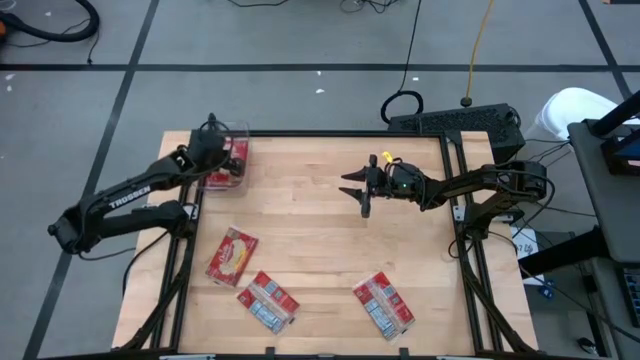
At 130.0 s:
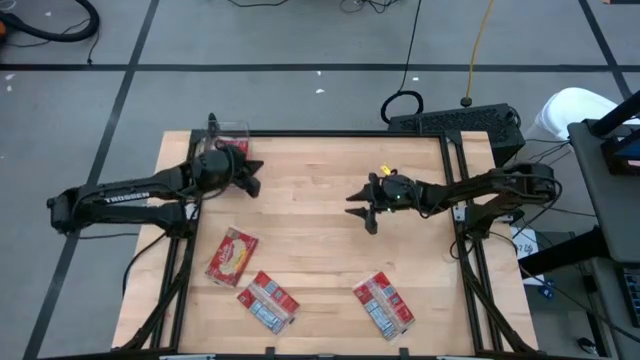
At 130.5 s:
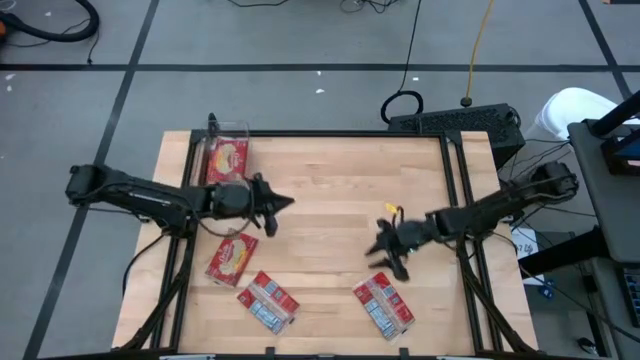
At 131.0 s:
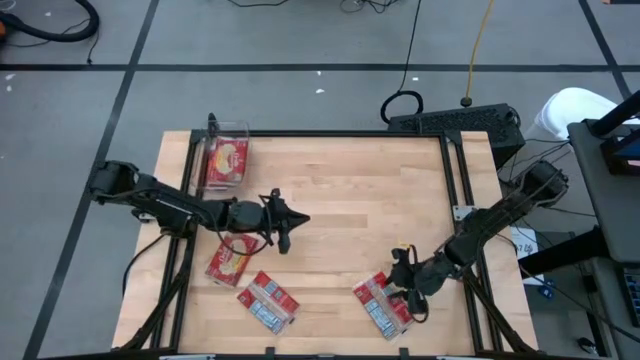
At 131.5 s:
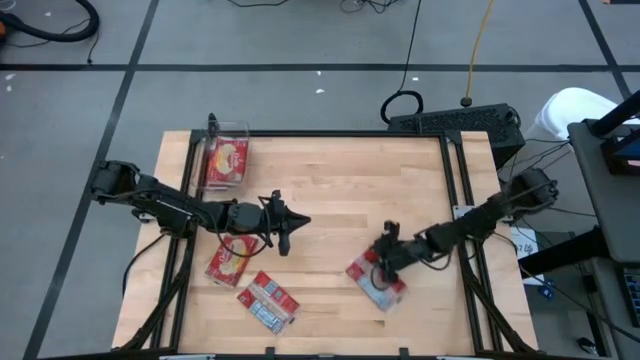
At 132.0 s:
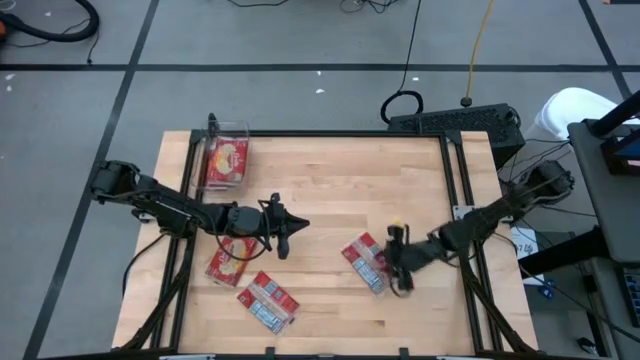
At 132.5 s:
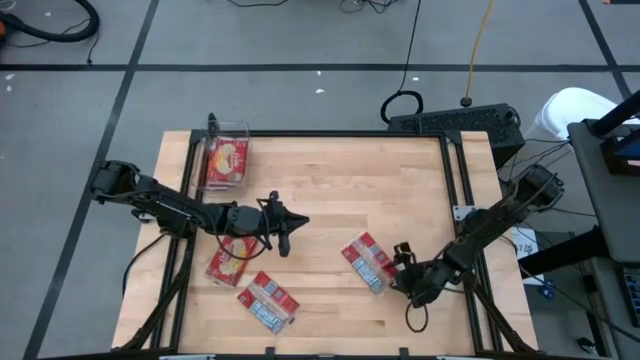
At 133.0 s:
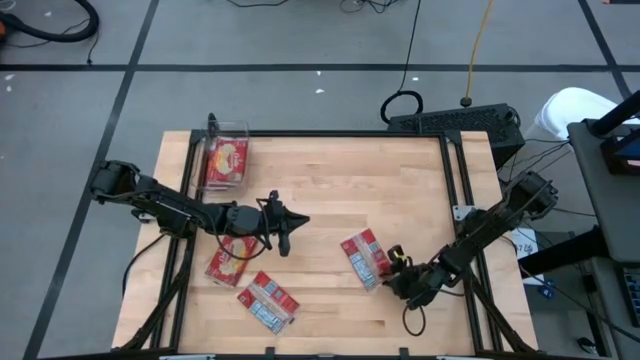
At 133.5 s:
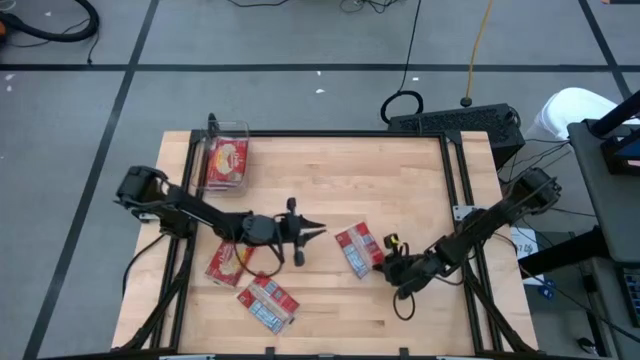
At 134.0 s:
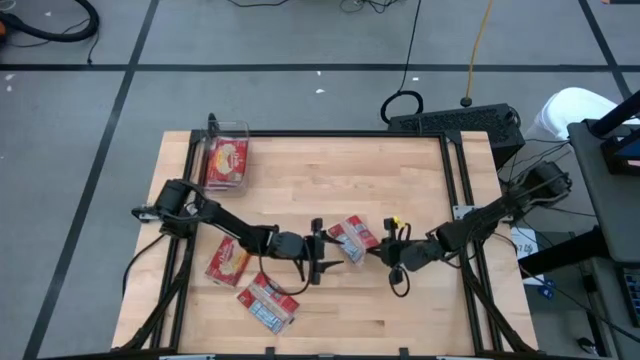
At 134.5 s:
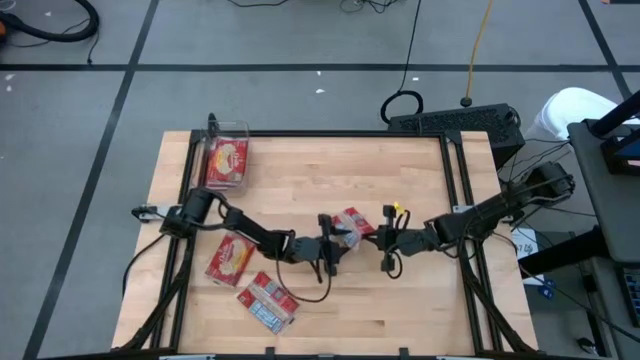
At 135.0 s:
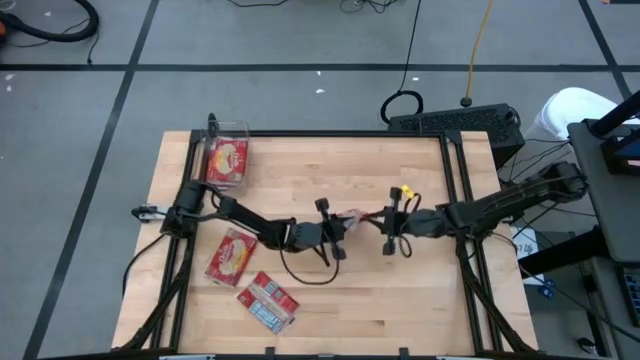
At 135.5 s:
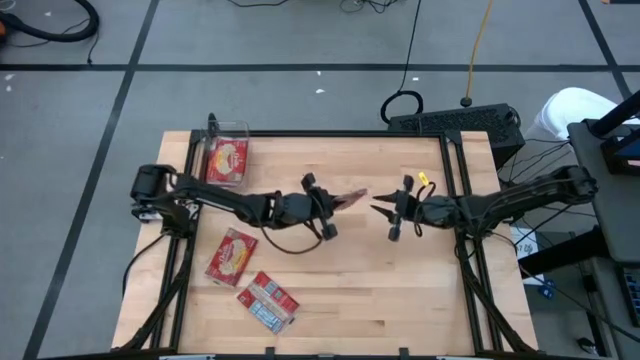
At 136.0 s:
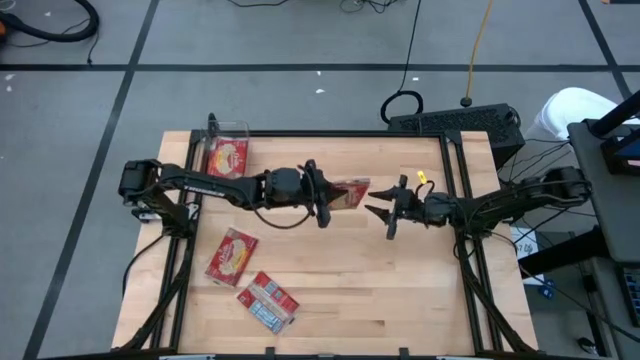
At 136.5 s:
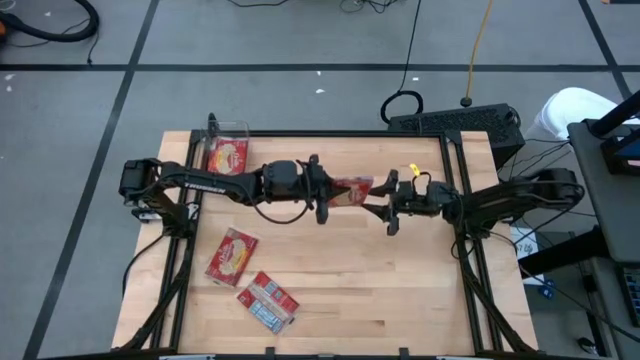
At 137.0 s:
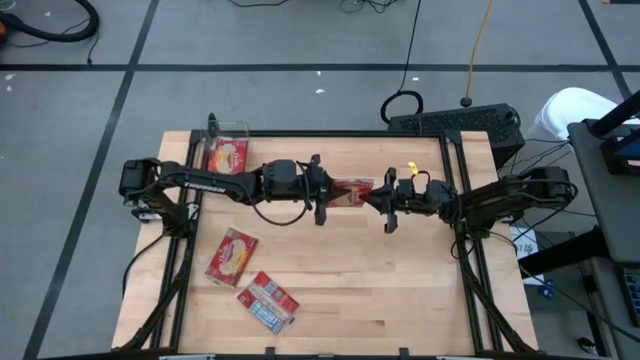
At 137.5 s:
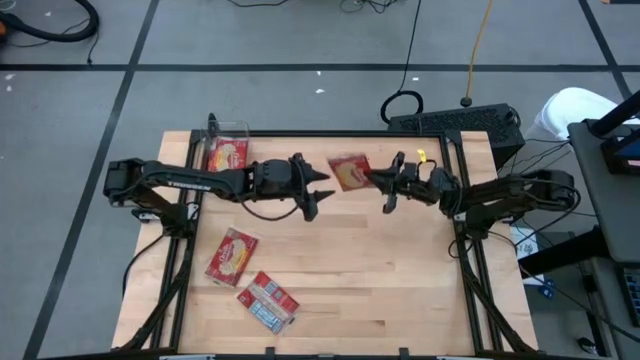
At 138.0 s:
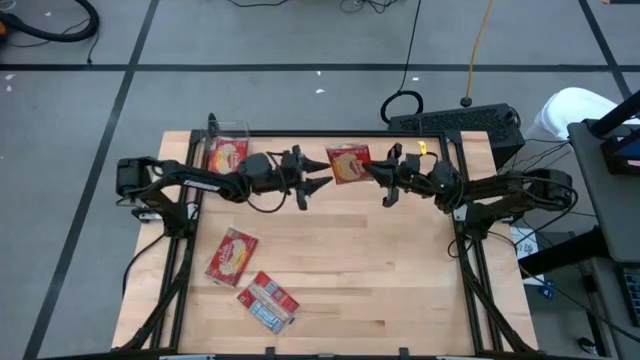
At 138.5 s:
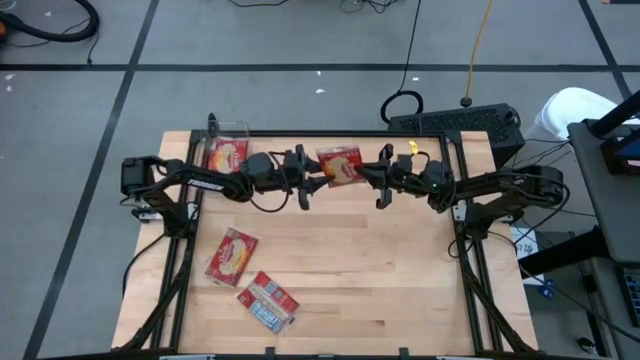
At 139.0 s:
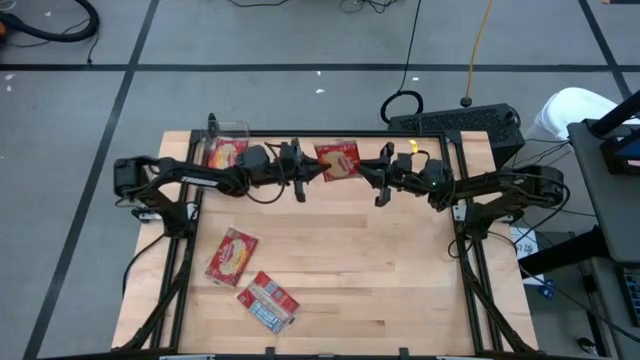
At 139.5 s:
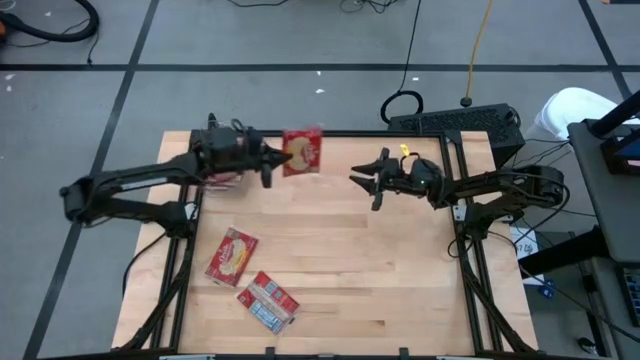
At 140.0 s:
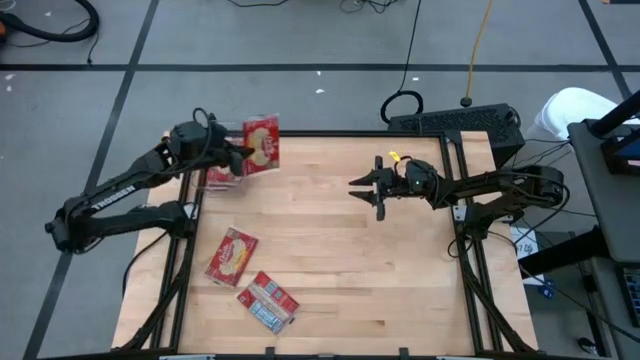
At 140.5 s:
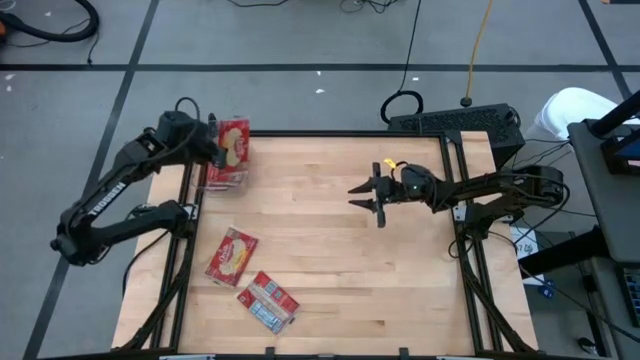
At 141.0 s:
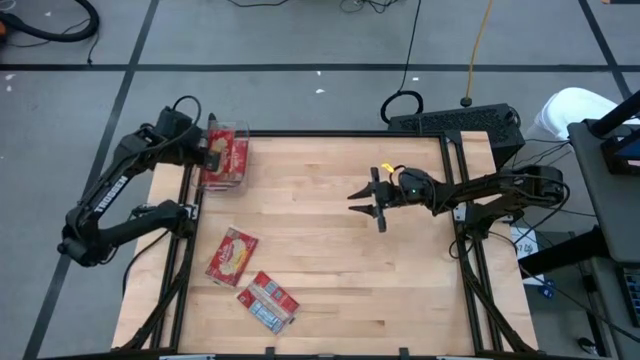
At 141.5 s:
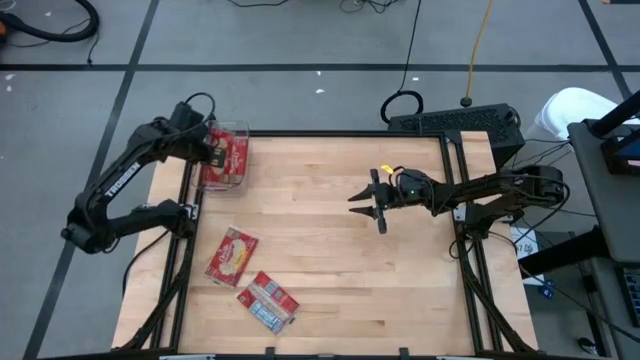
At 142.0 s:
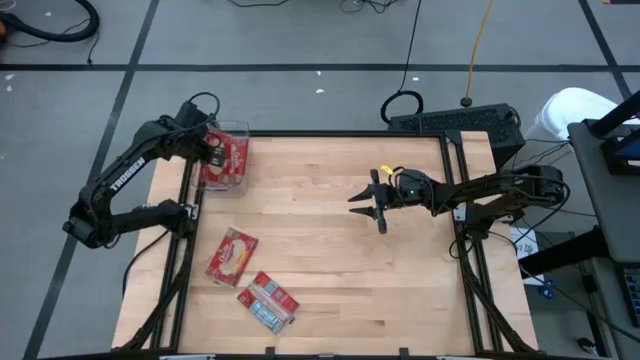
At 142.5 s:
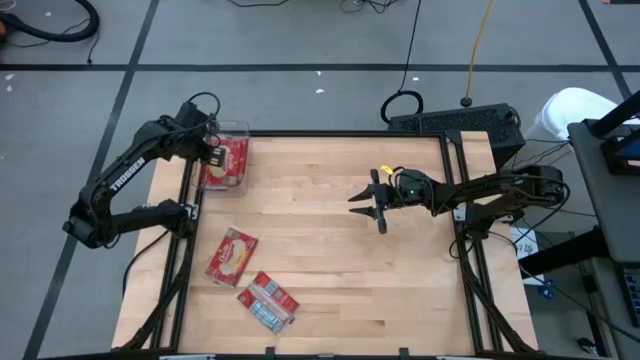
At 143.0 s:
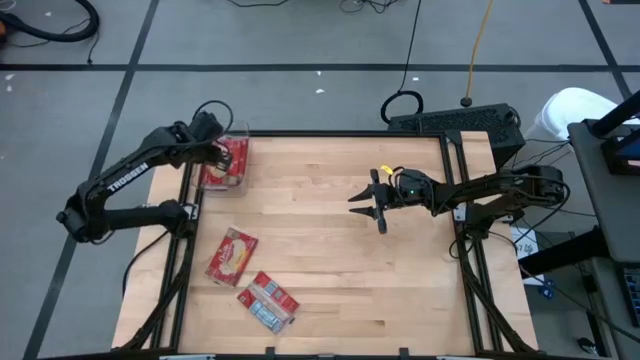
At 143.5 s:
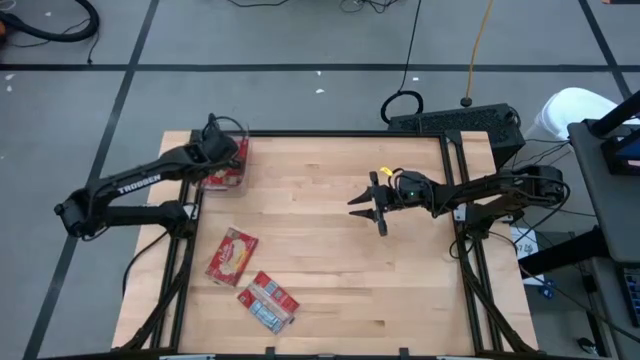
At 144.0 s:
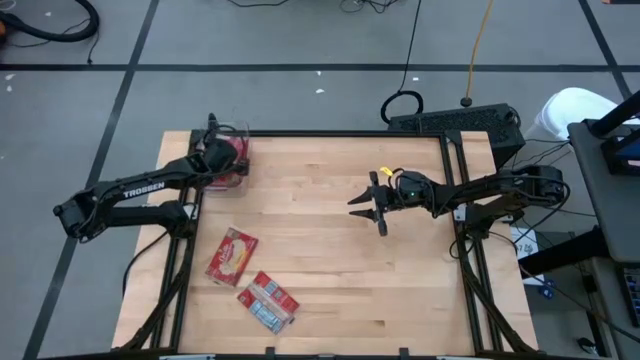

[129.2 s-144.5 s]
Task: Sort popcorn bags into baskets
Put the red popcorn bag into the transparent bin

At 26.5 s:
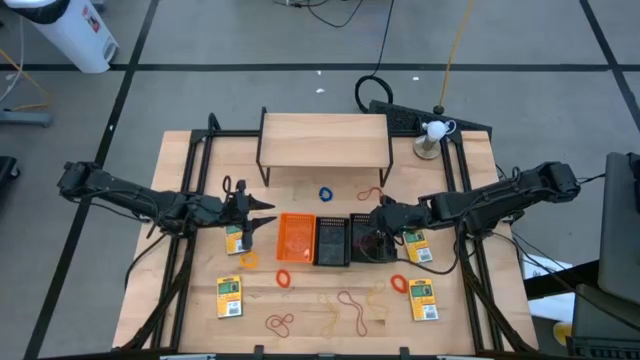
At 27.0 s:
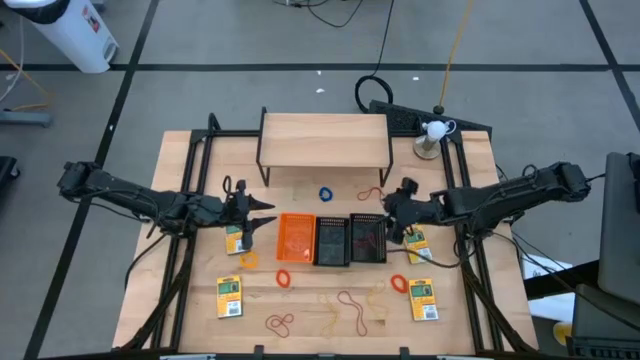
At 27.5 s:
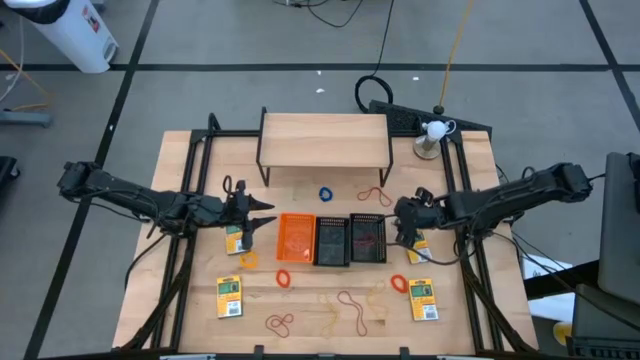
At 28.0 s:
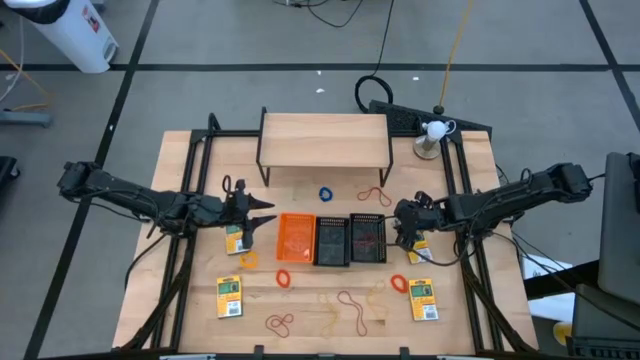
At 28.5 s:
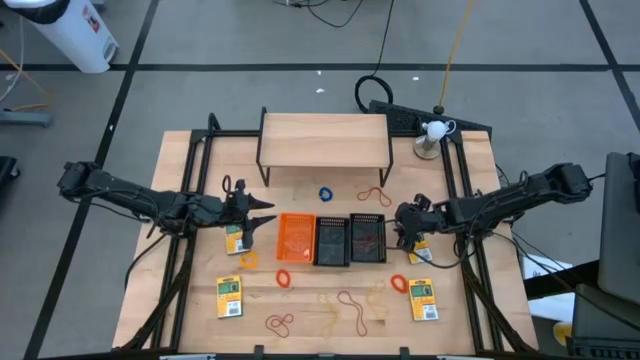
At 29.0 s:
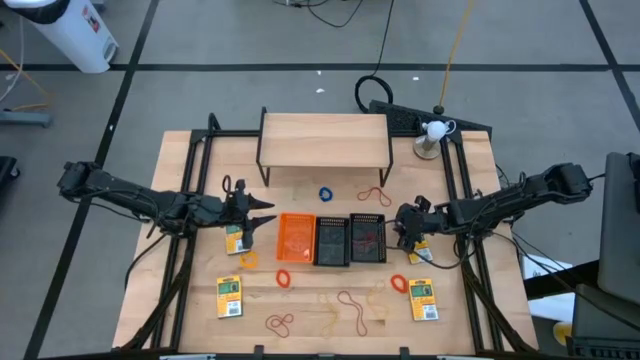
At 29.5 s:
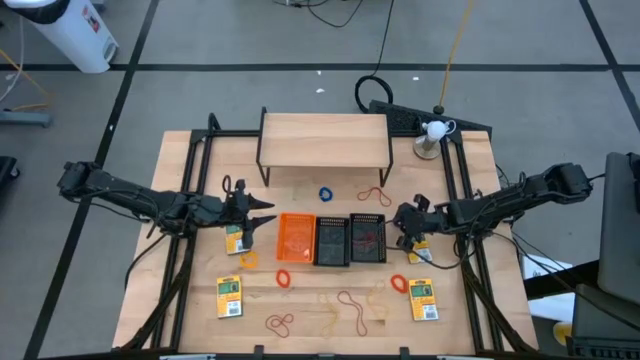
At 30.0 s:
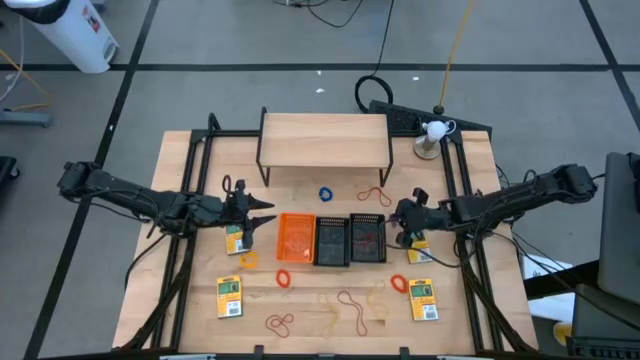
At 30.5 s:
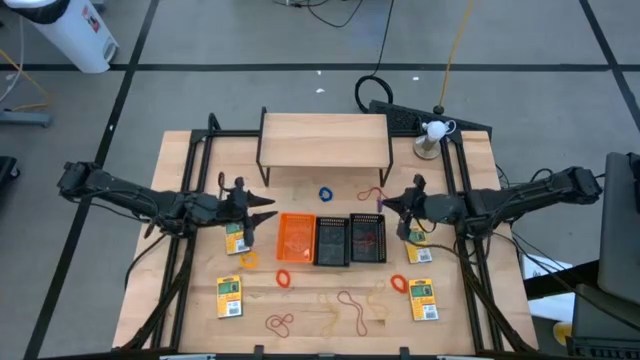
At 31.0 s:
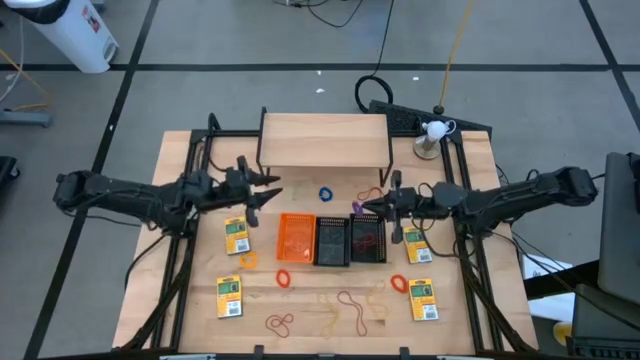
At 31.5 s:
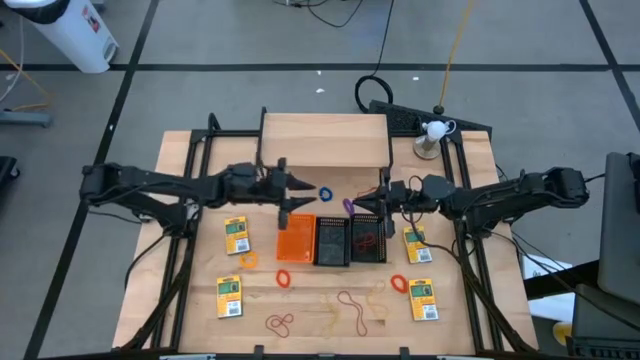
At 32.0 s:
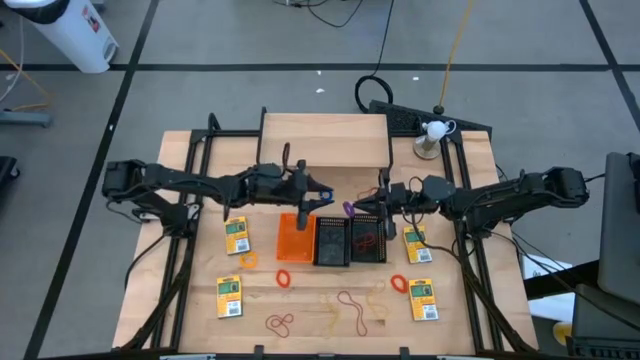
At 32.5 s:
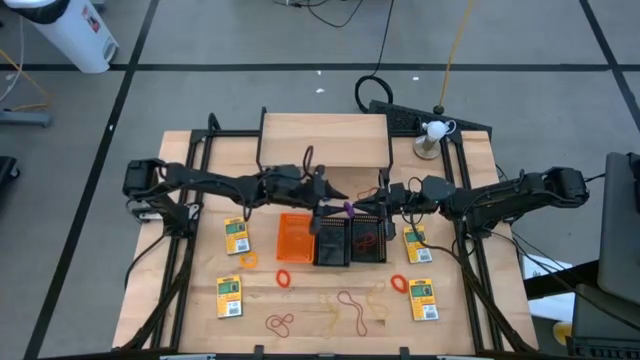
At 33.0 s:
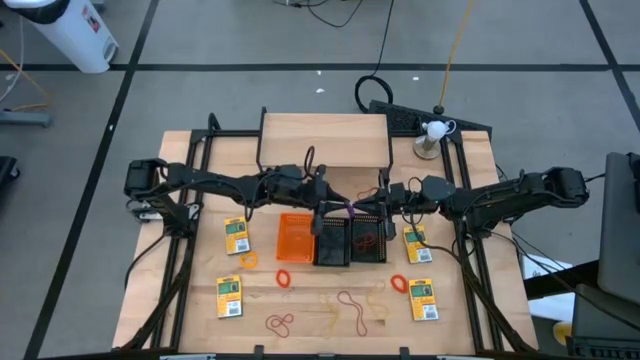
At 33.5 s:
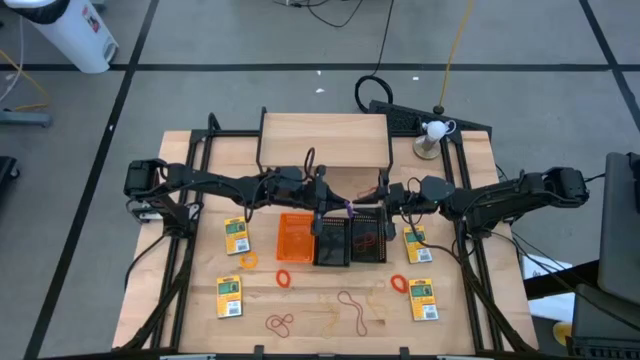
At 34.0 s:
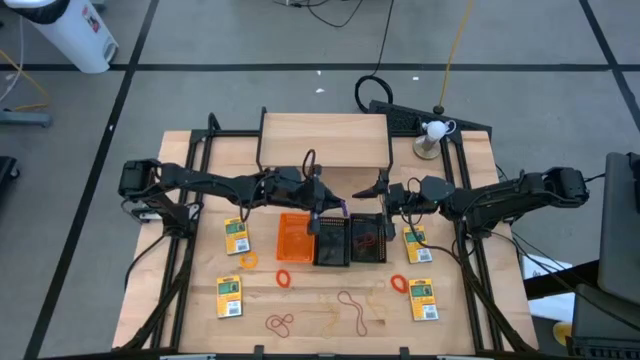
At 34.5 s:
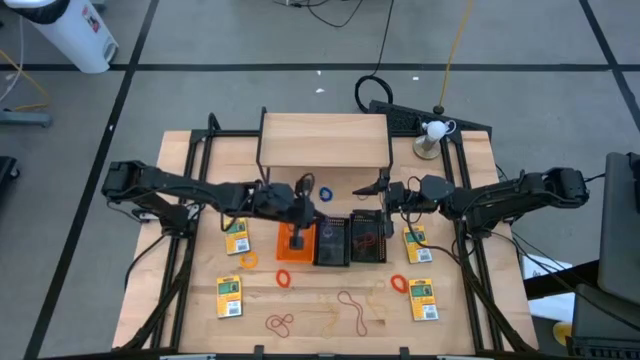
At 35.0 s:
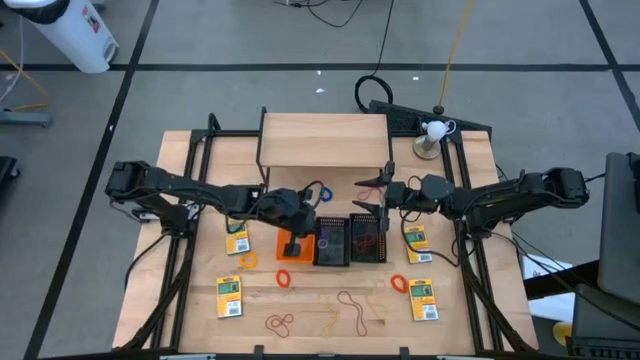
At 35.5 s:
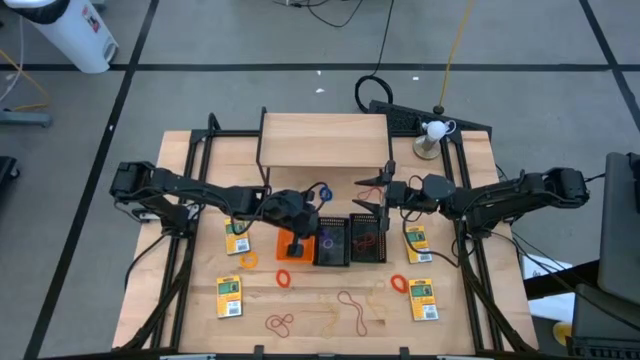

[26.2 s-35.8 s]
Task: Pick & Place Office Desk Supplies
Put the purple spring rubber band into the left black bin
